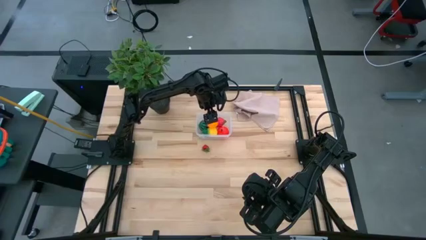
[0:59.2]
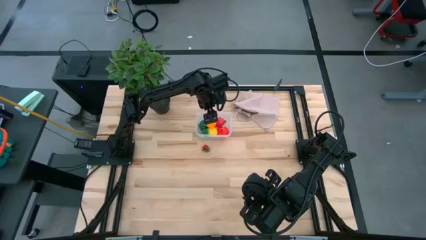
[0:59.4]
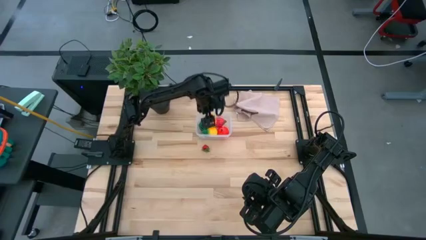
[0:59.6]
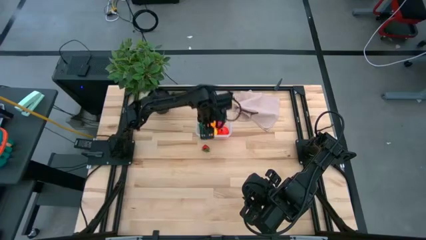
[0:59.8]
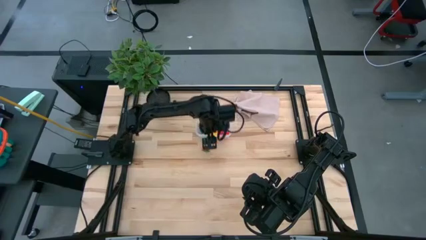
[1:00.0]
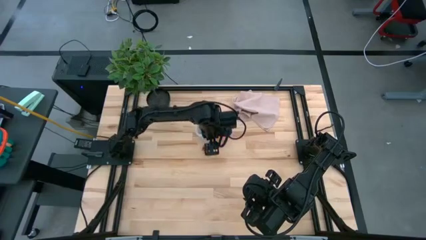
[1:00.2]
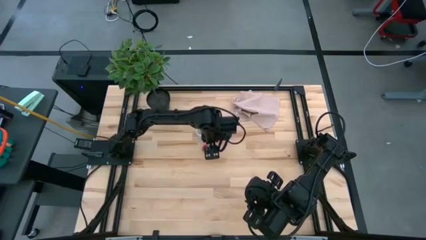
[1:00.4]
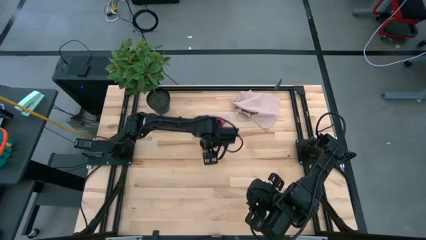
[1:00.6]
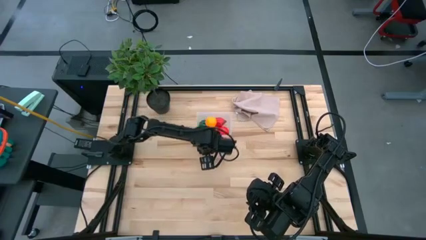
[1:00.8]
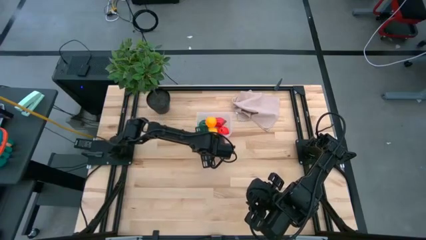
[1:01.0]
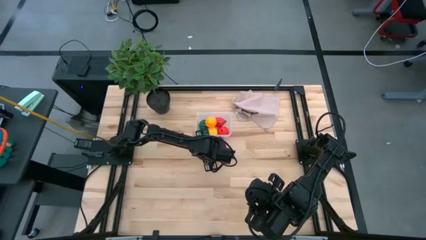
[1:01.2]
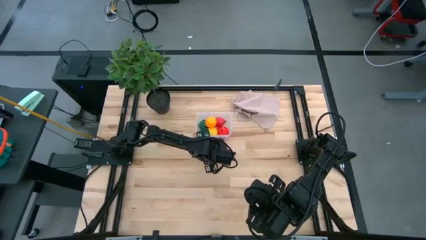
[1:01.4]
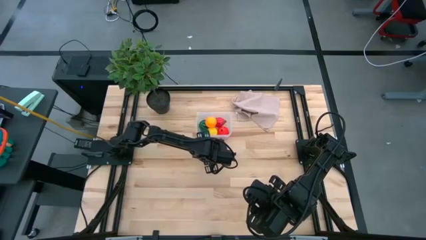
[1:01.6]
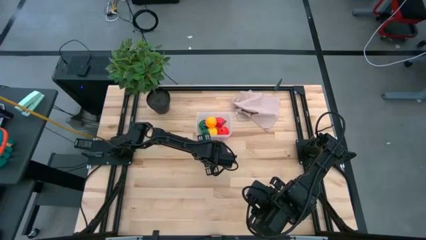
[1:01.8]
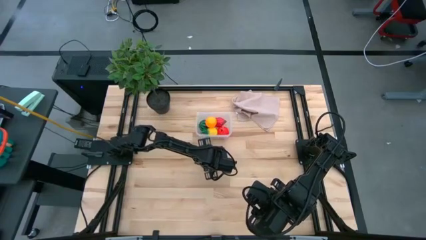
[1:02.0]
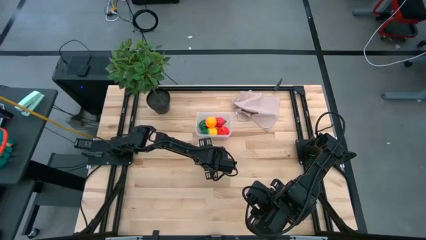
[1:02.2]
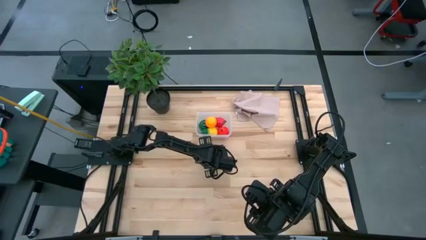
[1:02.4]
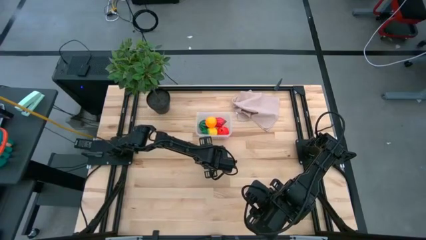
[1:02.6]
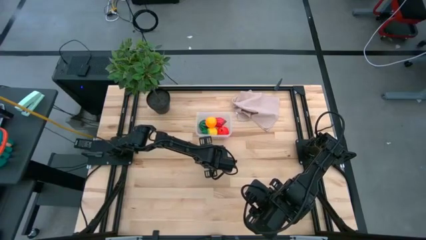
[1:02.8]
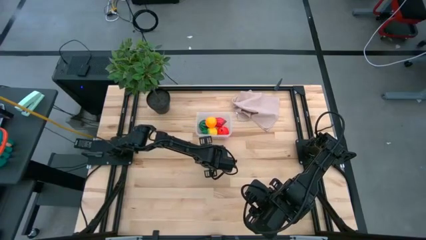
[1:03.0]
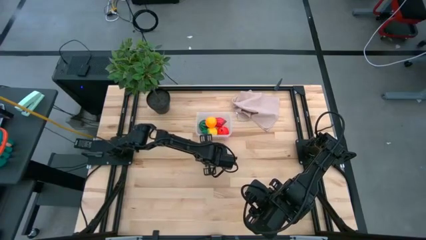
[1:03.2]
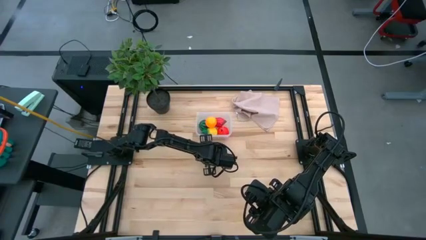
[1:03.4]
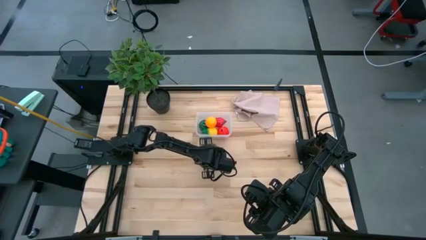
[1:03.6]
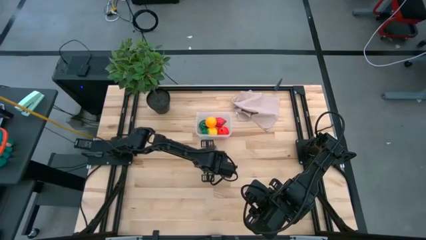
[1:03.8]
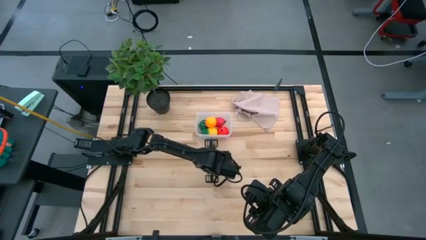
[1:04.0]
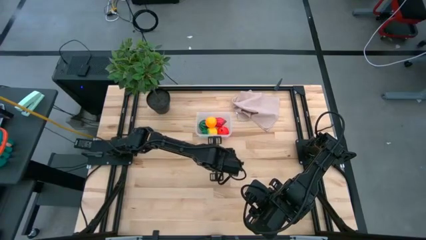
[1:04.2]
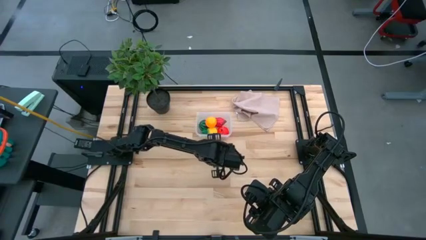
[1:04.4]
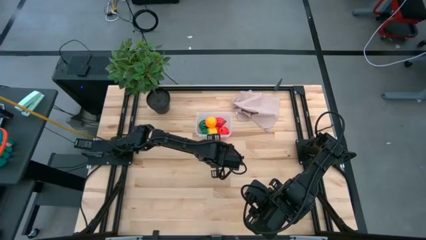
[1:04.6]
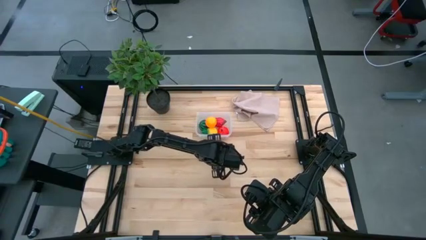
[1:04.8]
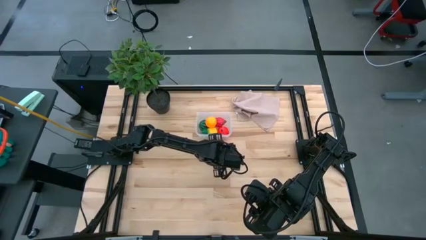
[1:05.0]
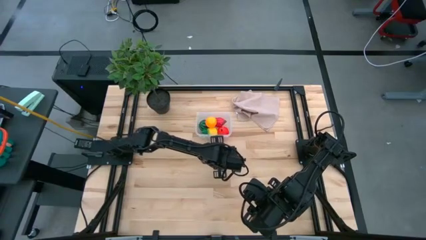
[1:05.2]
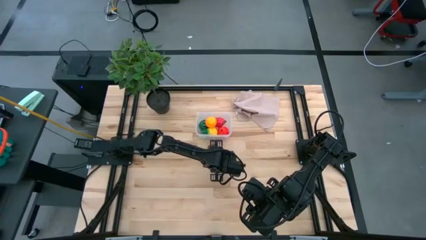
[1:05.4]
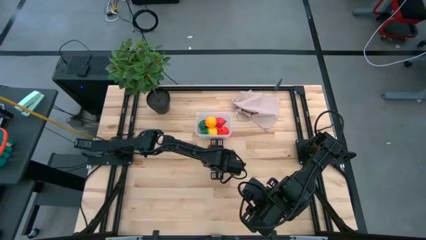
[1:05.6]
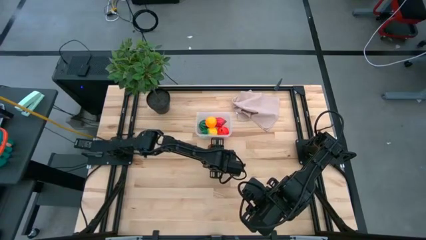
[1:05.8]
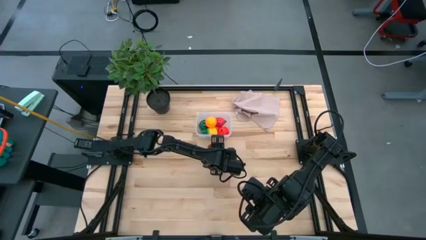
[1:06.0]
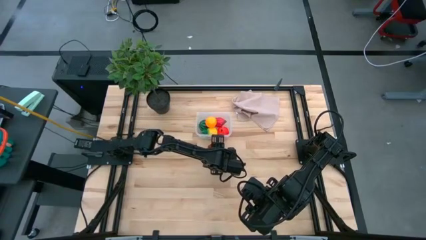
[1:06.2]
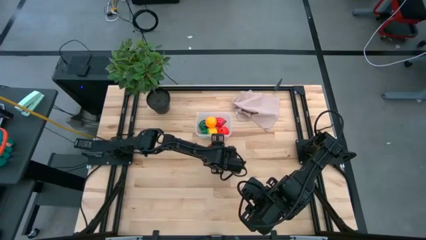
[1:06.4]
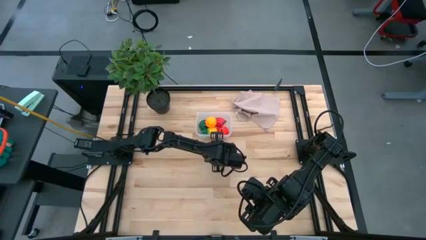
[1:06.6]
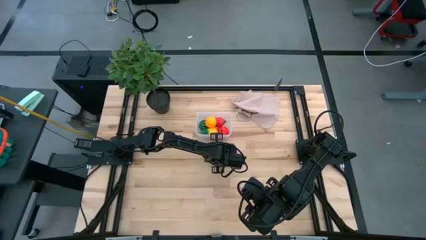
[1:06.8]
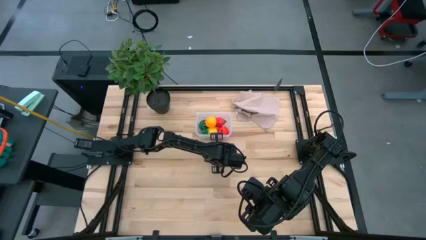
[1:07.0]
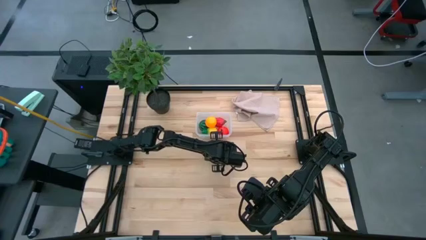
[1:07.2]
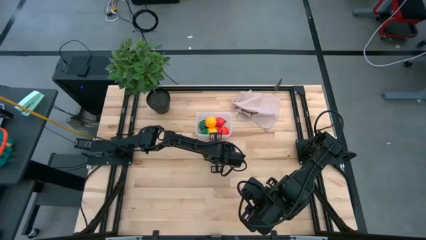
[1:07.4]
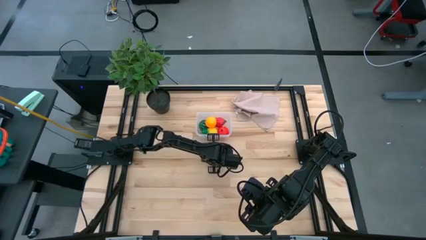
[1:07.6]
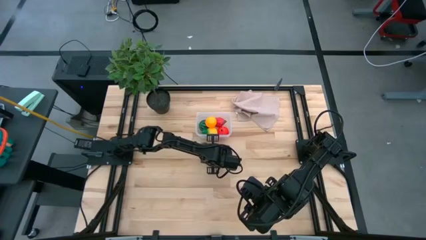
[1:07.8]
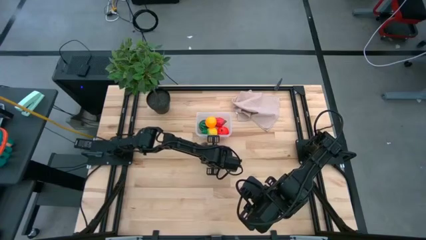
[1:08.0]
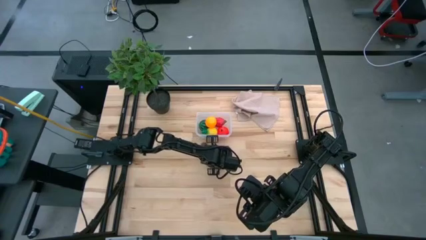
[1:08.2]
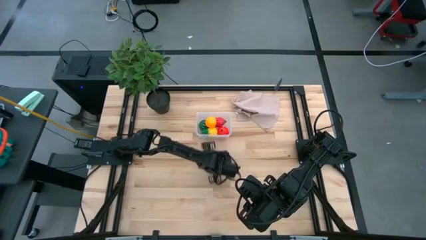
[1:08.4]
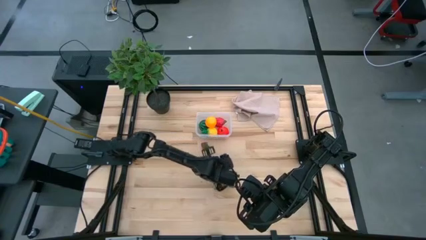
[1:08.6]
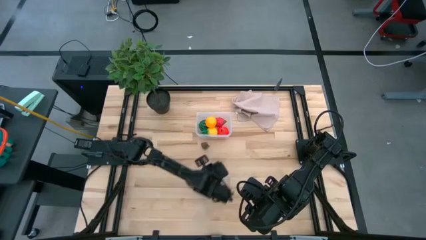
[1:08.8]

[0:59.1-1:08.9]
Task: Pick and placing Produce into tupperware
Put the red strawberry into the transparent container

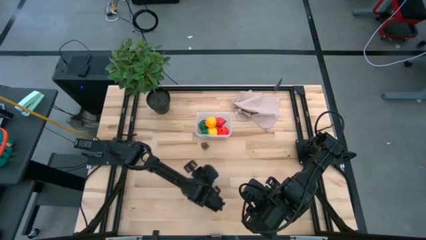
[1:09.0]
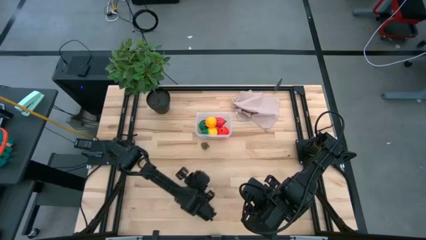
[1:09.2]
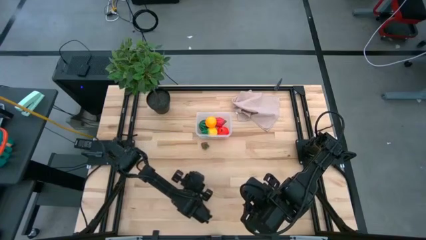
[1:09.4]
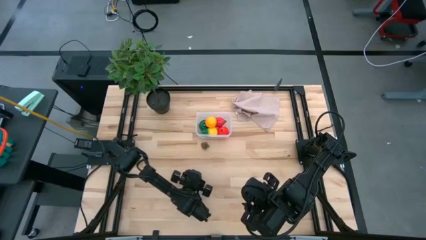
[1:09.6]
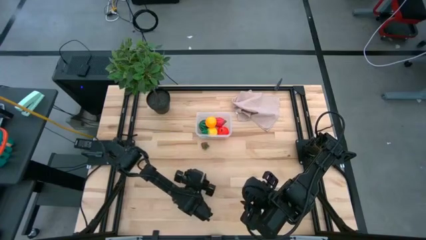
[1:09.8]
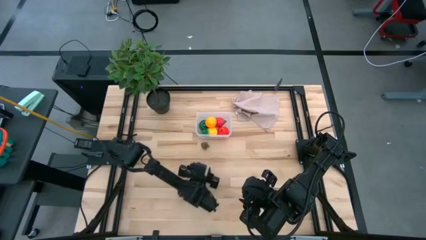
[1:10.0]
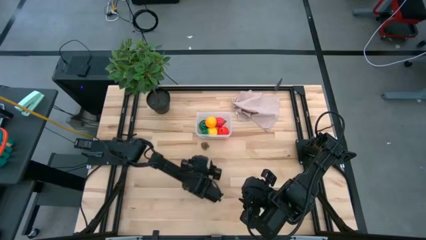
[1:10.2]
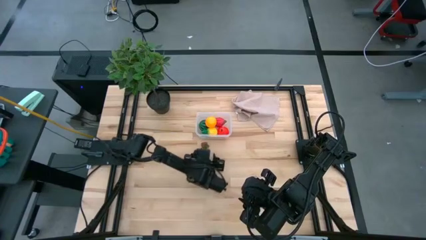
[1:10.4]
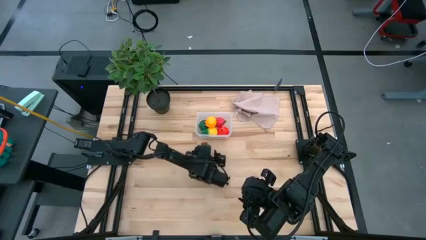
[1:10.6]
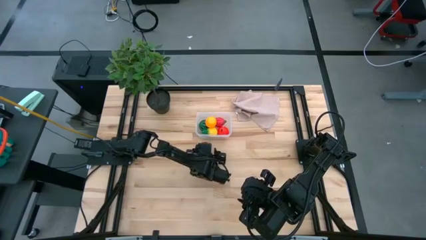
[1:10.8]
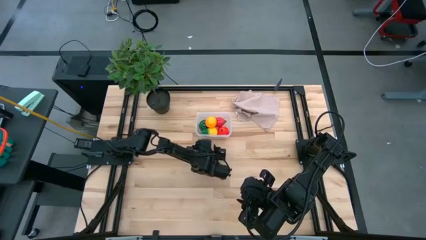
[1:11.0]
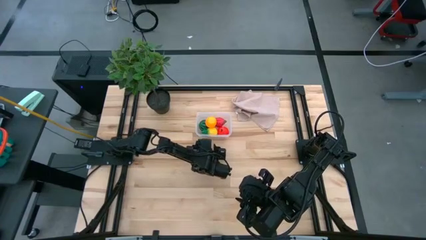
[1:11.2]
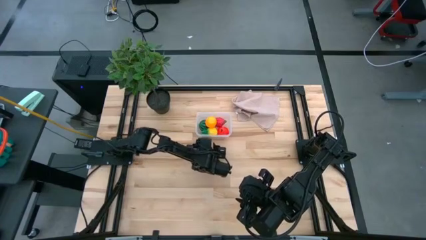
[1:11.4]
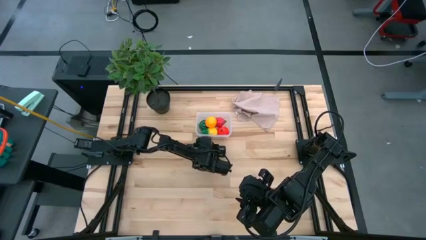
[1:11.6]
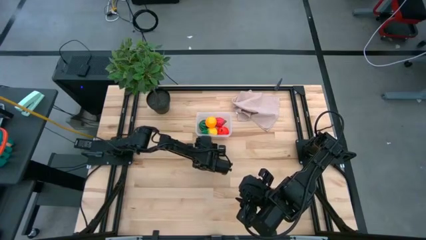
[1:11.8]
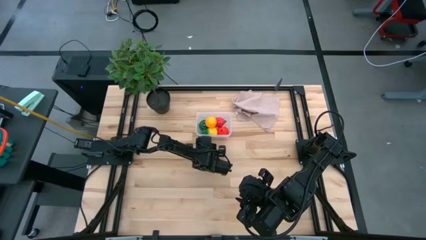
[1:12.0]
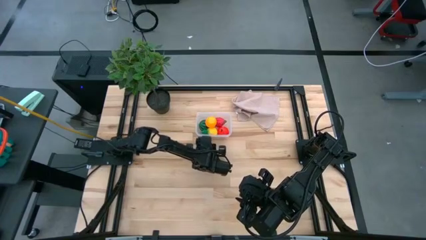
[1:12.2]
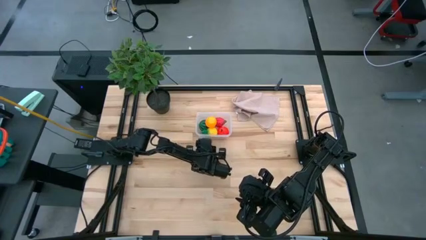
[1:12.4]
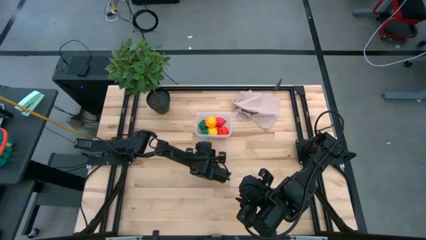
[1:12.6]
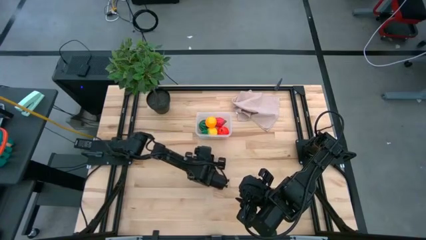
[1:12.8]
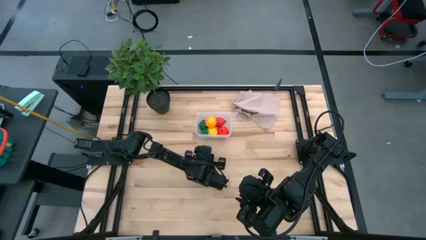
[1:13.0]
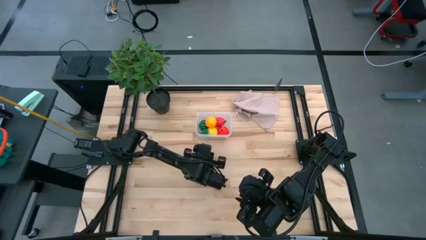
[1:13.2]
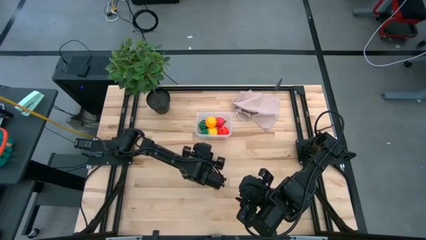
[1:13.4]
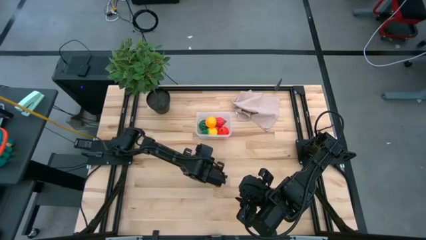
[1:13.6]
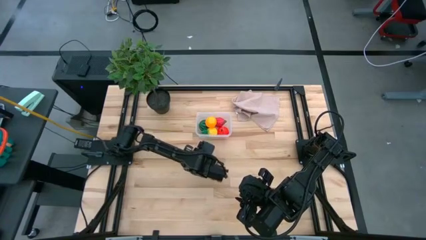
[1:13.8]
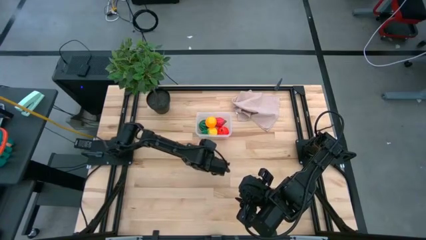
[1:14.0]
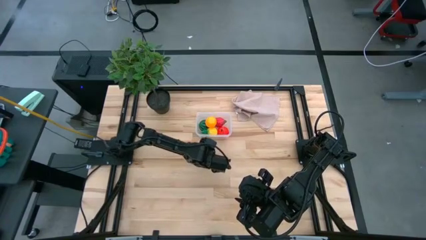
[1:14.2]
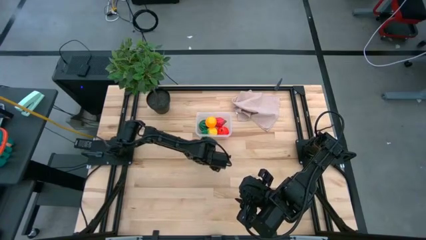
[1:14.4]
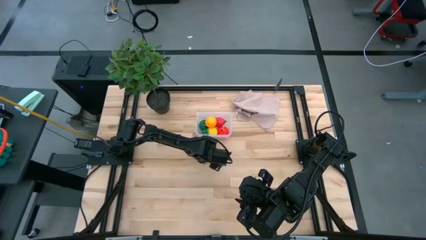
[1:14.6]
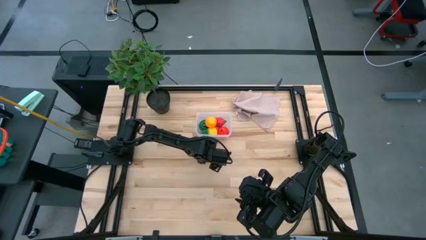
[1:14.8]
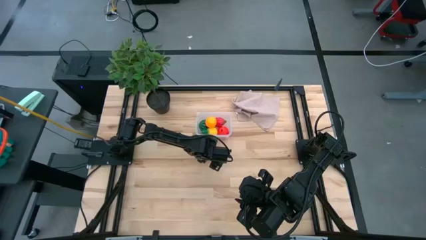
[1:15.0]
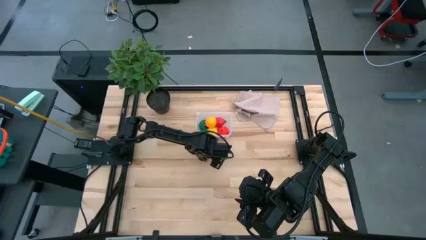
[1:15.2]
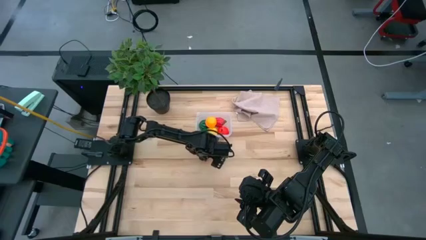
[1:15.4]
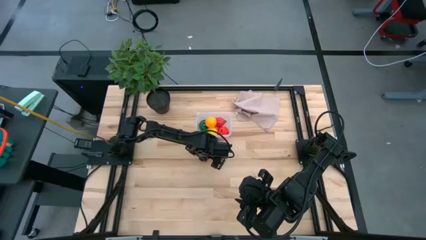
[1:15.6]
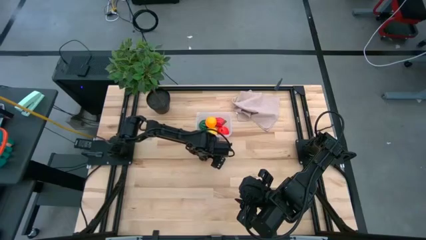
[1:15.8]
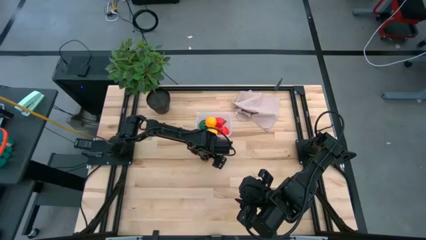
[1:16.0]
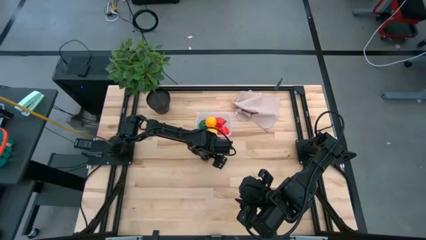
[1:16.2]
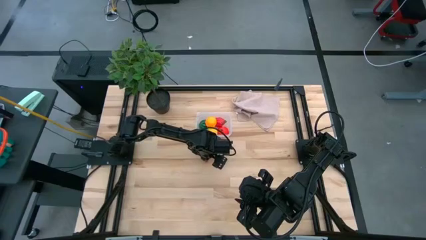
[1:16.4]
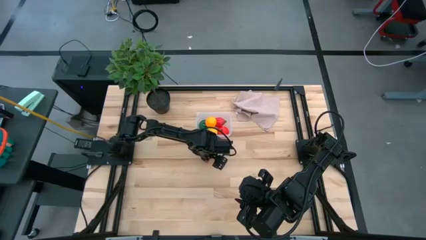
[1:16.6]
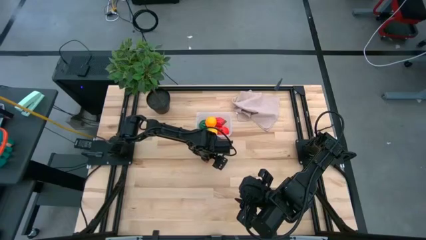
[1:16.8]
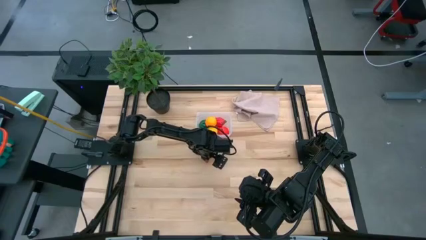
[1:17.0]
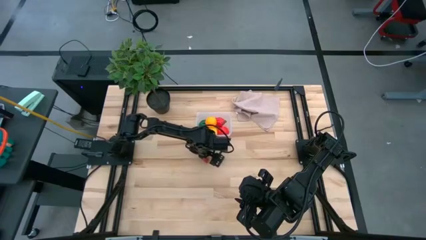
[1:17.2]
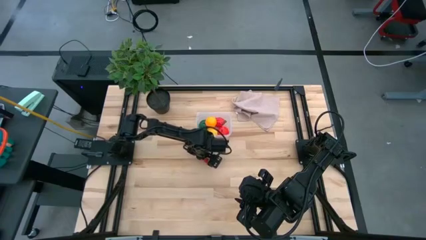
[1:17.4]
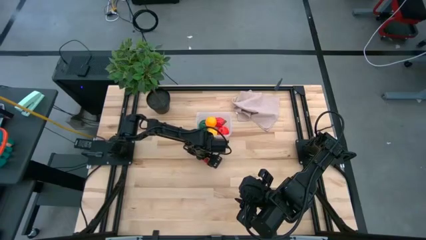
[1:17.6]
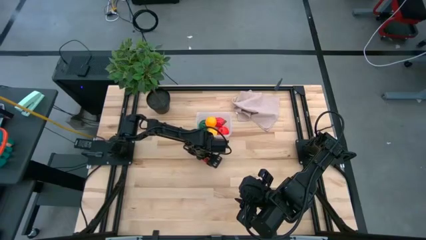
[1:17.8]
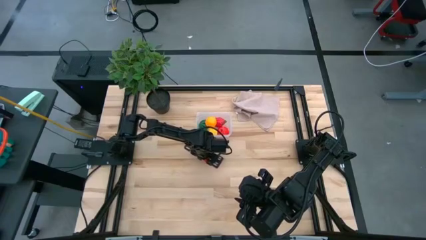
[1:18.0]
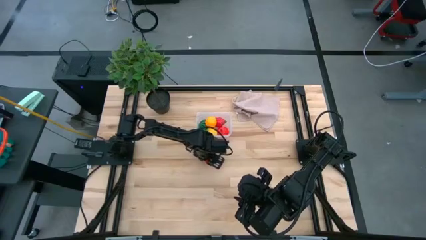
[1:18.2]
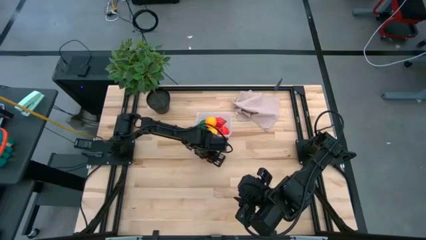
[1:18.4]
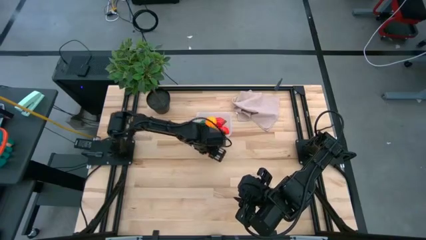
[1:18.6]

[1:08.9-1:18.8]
Put the red strawberry into the transparent container
